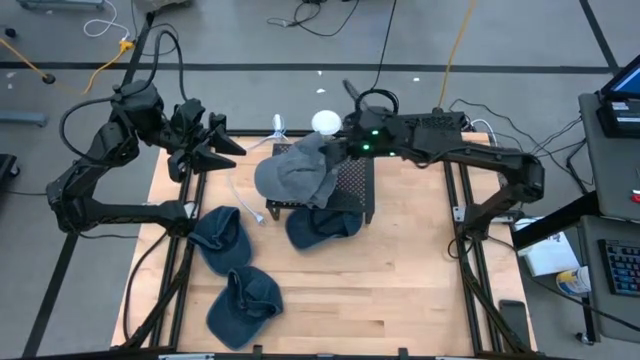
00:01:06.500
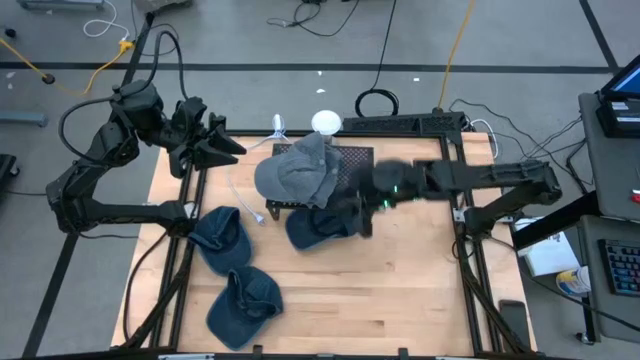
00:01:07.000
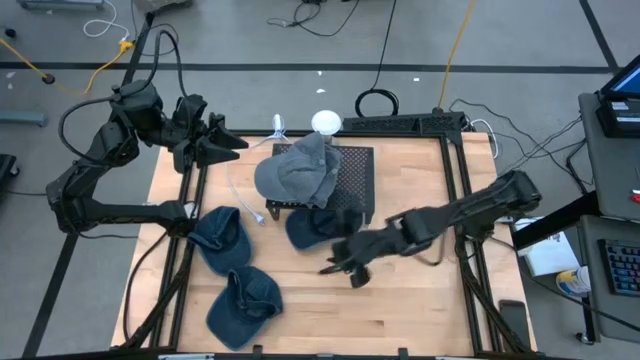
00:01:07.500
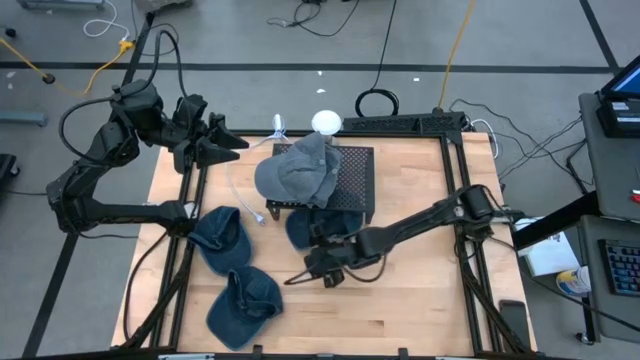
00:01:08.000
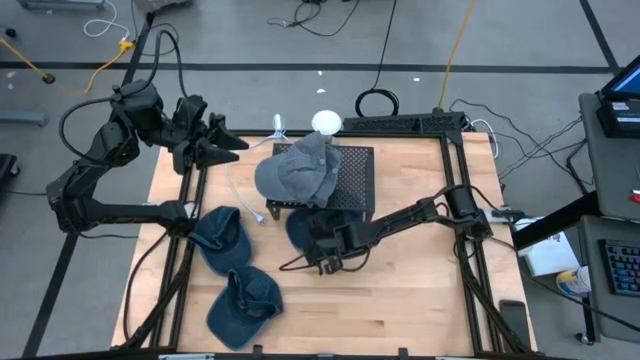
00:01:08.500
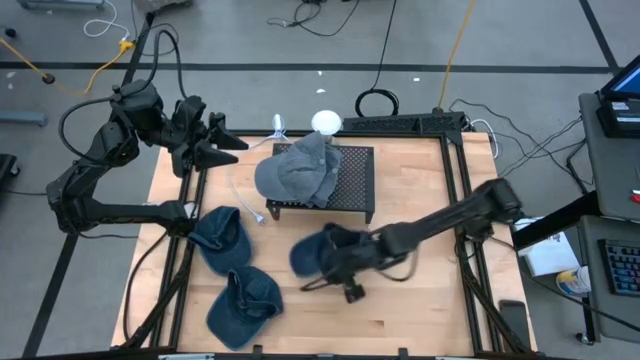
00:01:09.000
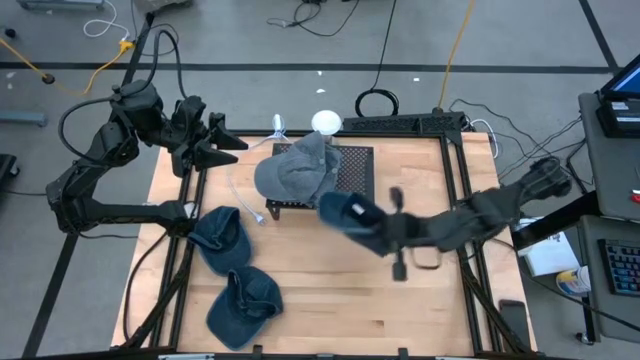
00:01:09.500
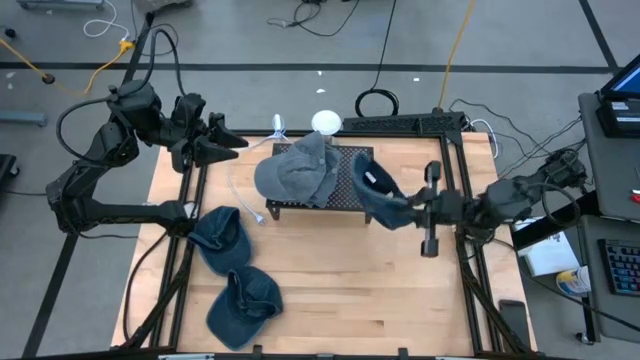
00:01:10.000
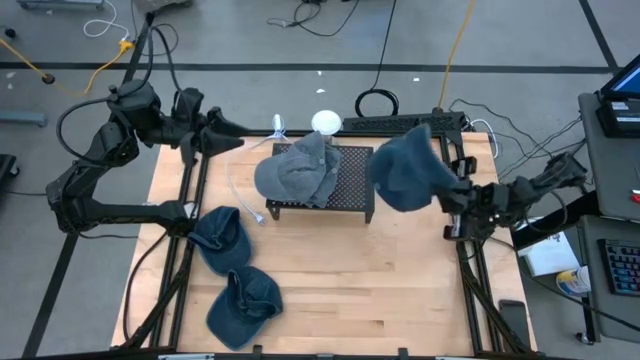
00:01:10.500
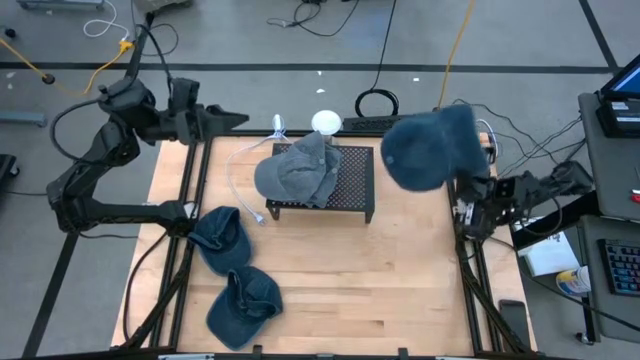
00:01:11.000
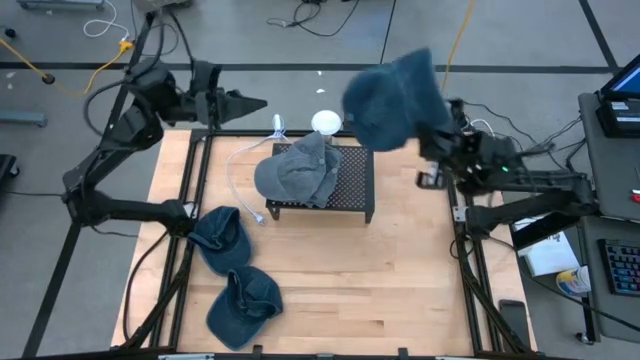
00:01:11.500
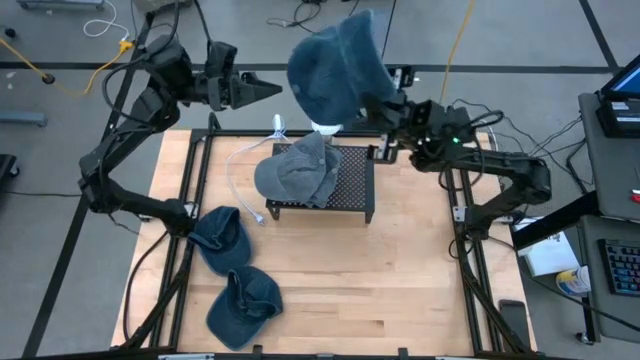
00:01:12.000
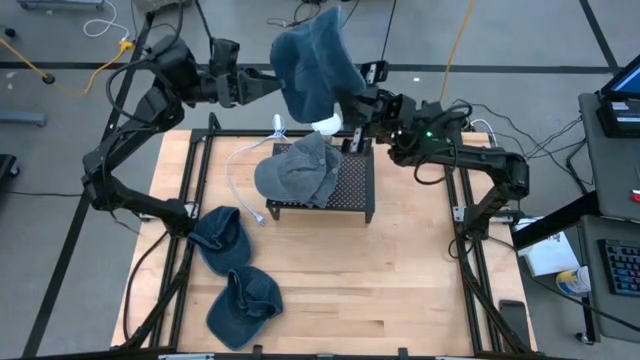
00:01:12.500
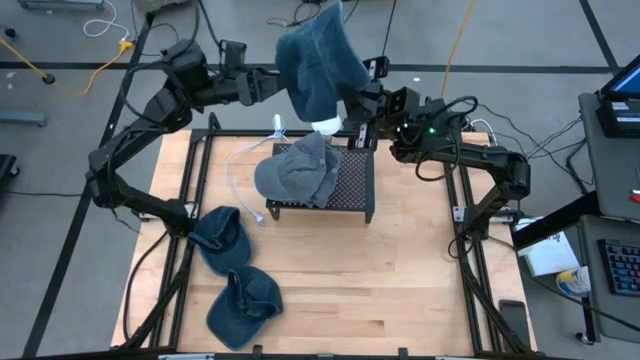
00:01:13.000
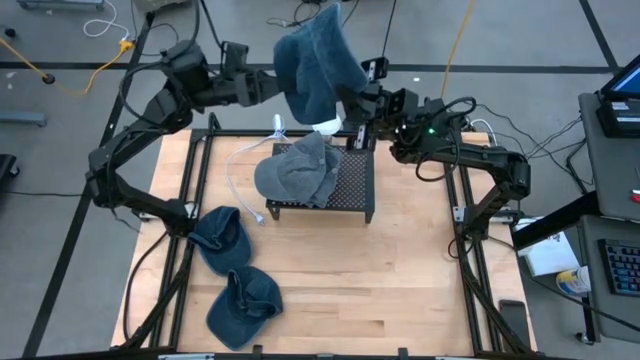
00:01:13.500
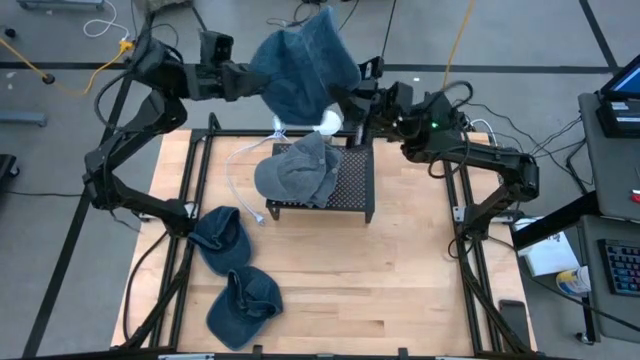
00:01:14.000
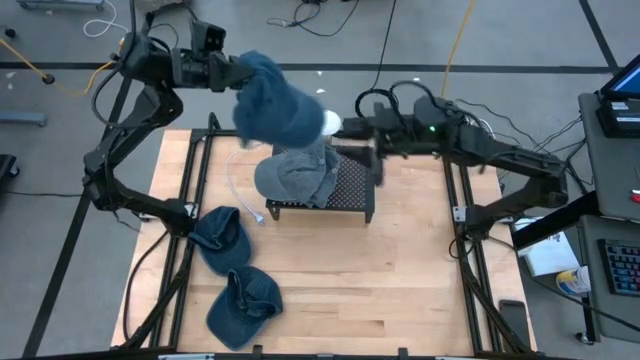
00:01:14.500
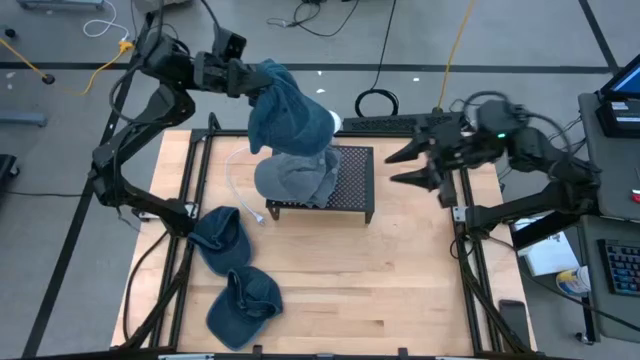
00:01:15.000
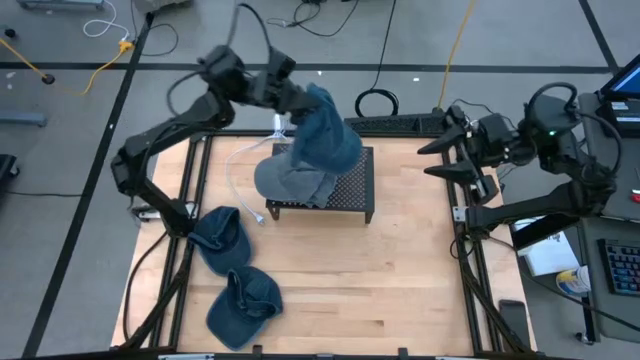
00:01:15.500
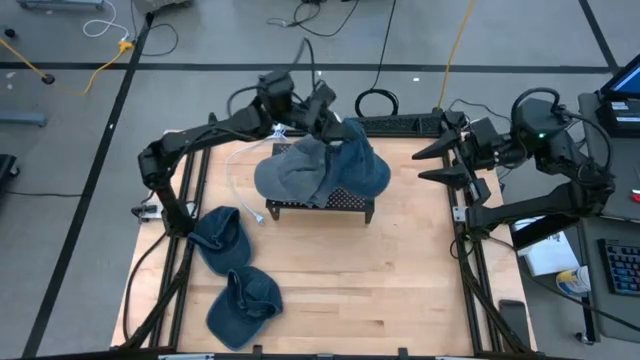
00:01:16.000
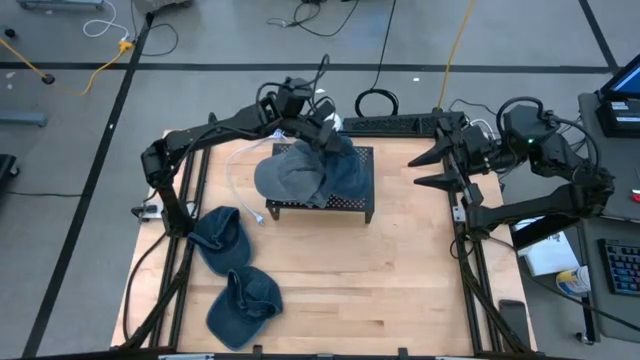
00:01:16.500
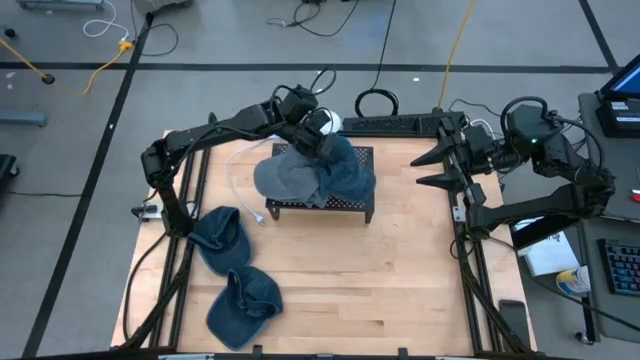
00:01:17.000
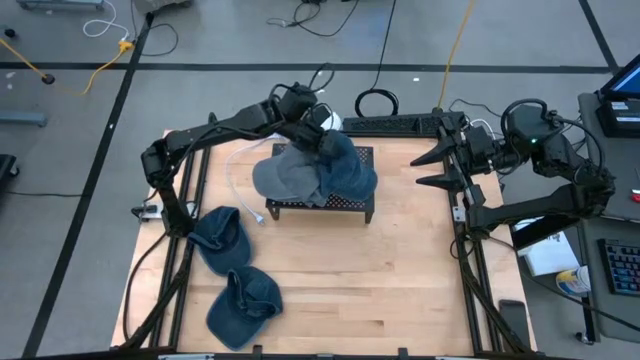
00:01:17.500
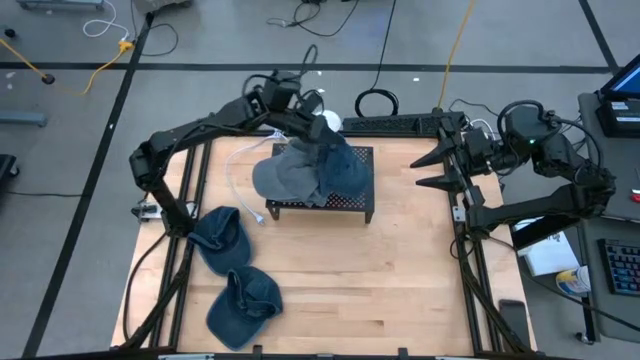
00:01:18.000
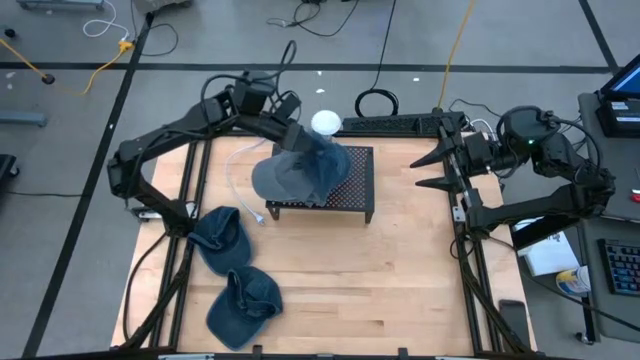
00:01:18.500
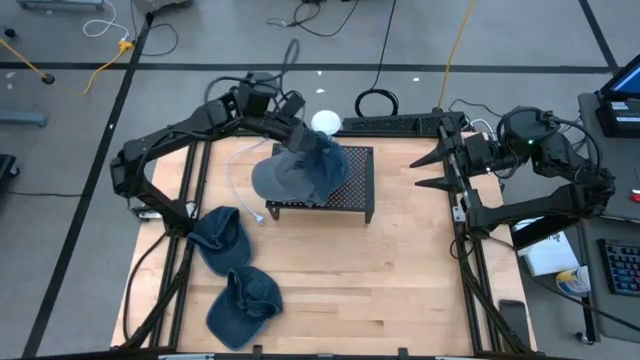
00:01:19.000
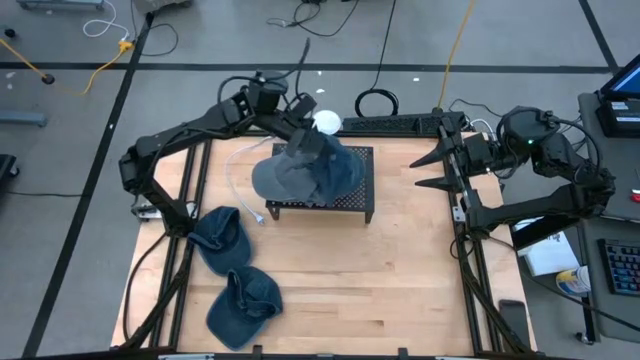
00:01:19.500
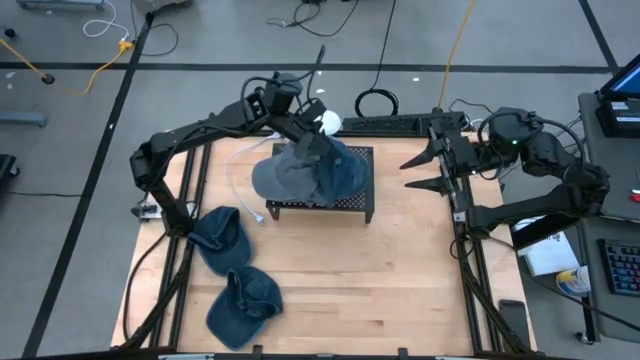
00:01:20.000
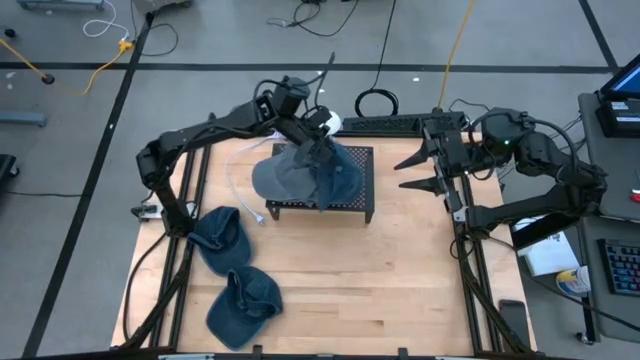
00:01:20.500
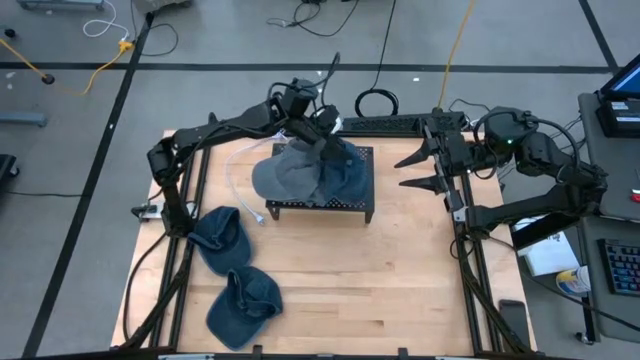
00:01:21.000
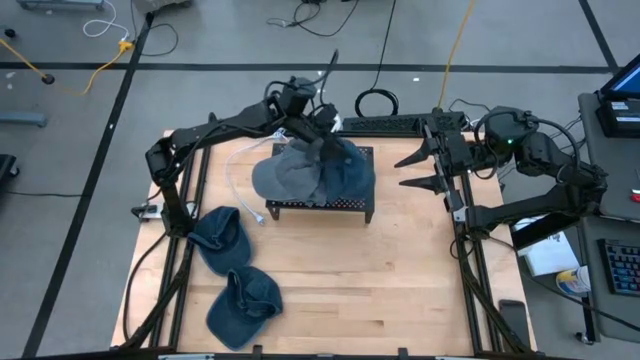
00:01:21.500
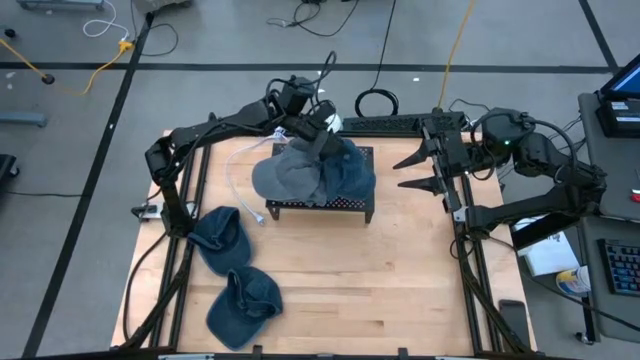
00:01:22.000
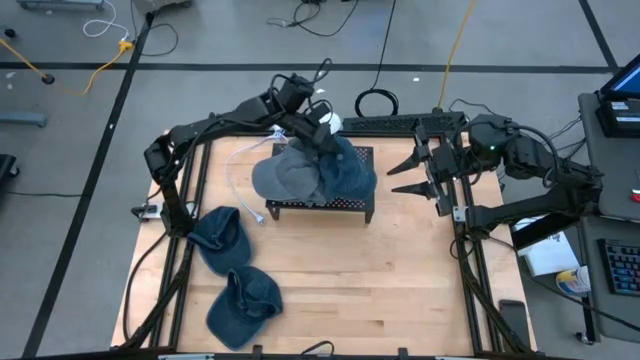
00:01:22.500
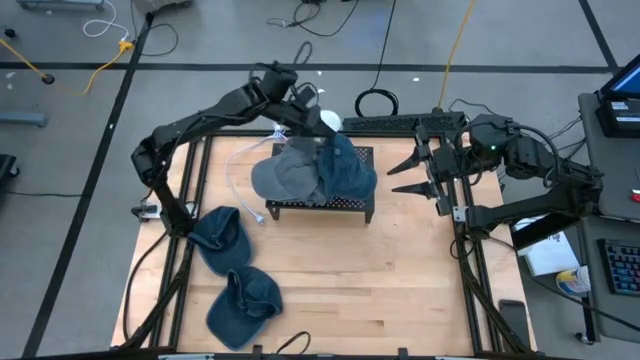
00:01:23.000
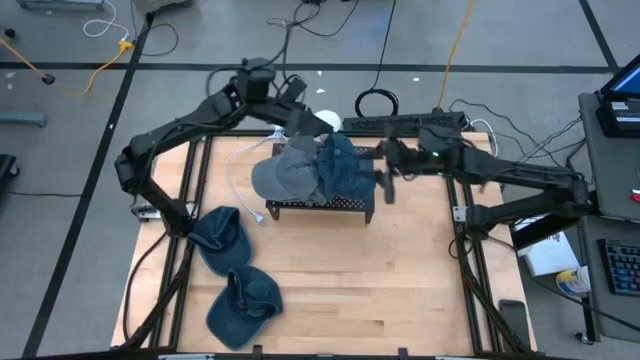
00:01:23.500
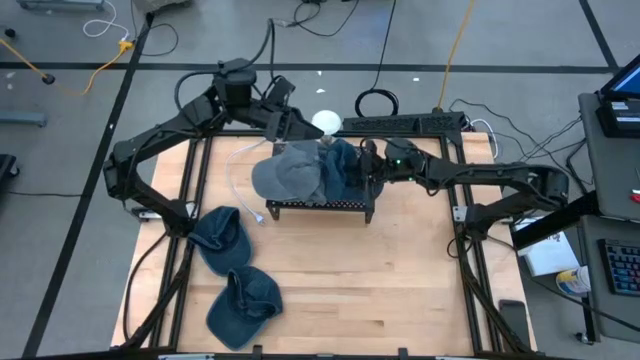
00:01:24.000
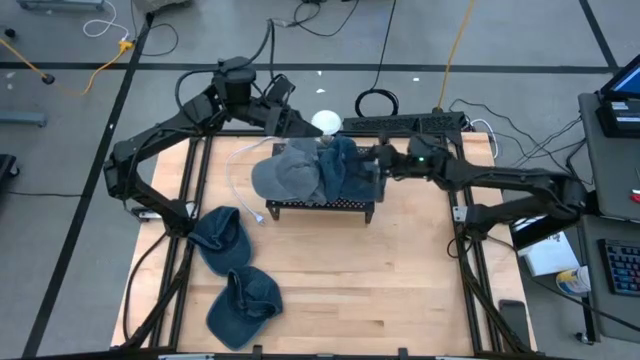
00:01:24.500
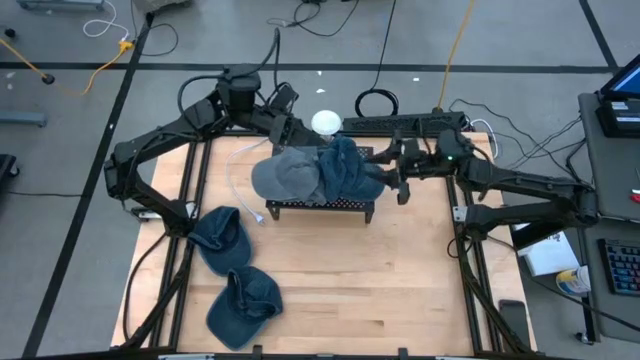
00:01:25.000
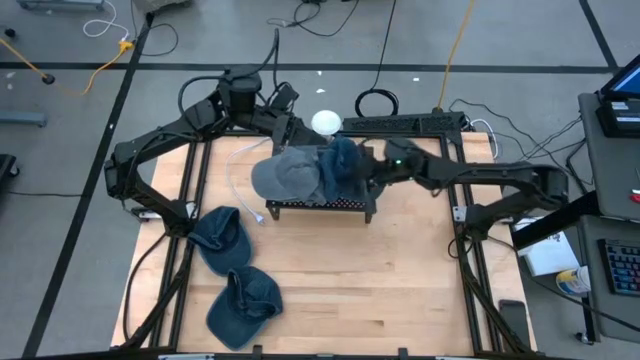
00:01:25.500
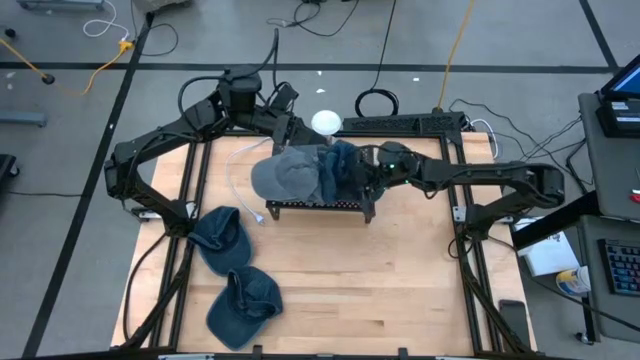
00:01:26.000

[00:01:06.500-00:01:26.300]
Task: Pick & Place hat
Put the top right blue cap on the shelf
